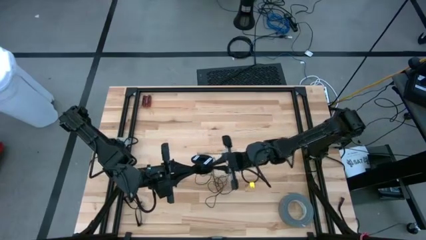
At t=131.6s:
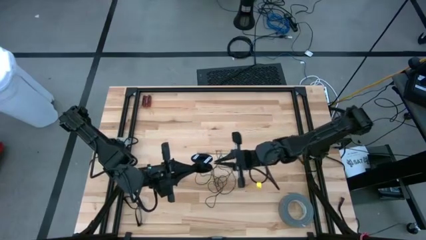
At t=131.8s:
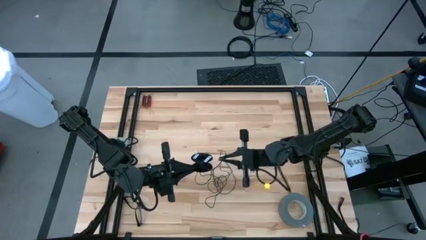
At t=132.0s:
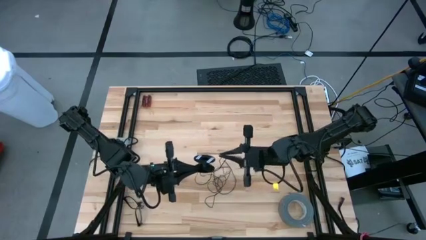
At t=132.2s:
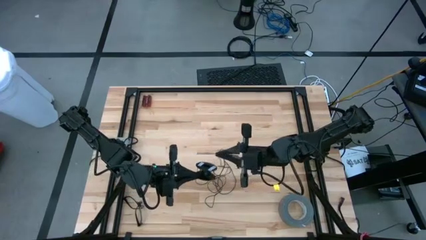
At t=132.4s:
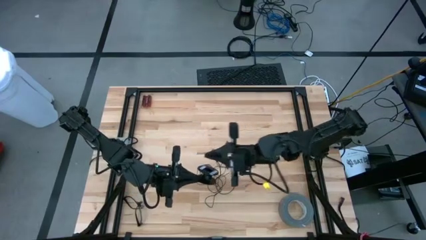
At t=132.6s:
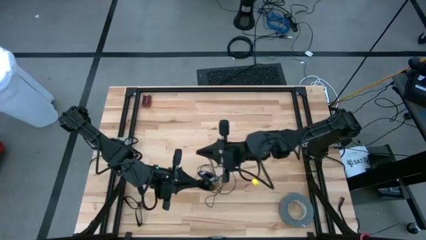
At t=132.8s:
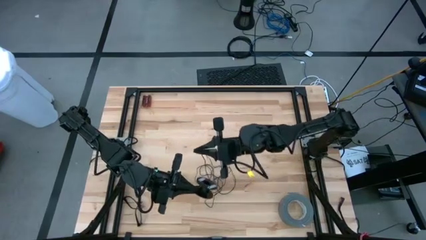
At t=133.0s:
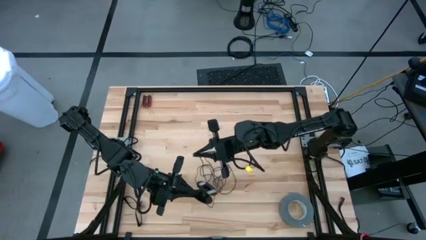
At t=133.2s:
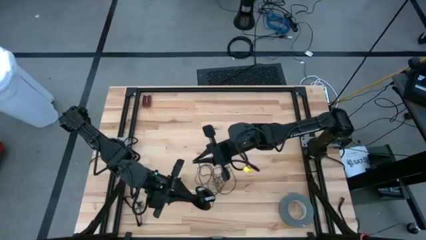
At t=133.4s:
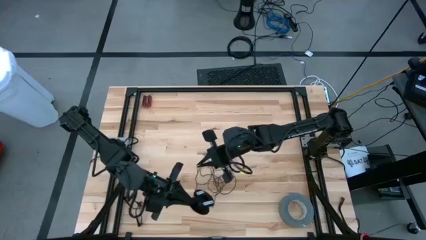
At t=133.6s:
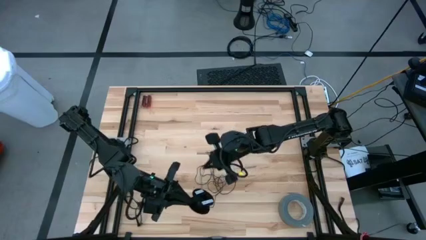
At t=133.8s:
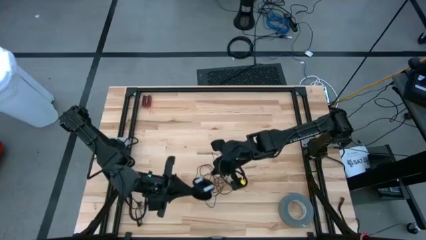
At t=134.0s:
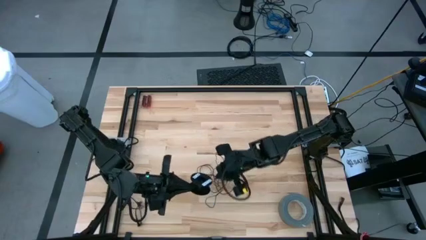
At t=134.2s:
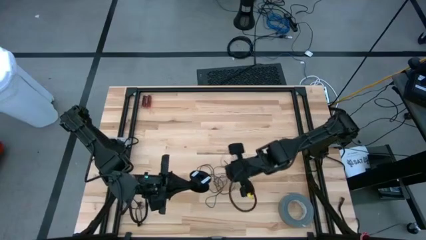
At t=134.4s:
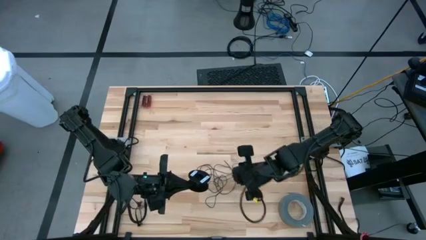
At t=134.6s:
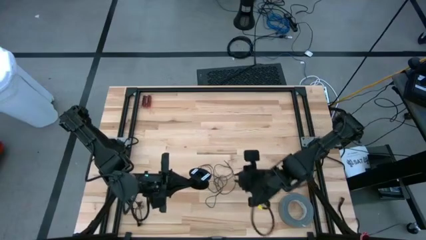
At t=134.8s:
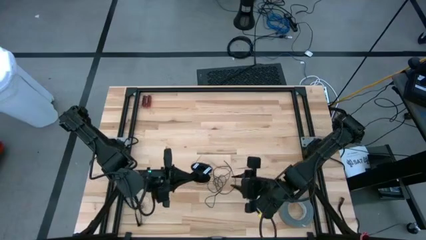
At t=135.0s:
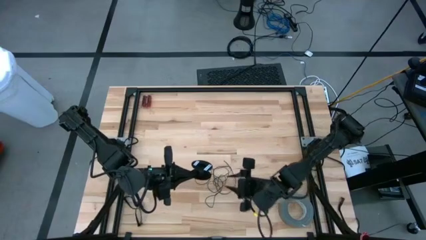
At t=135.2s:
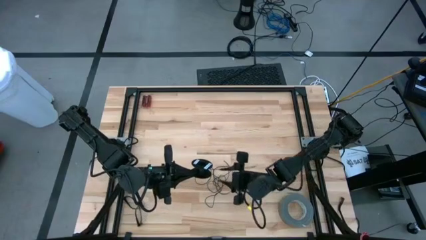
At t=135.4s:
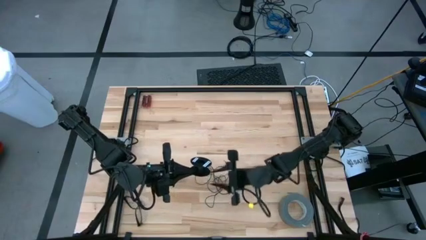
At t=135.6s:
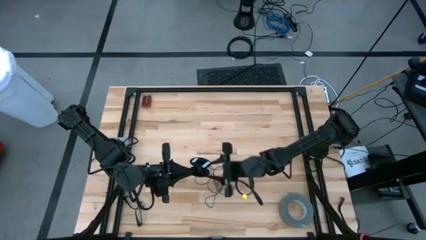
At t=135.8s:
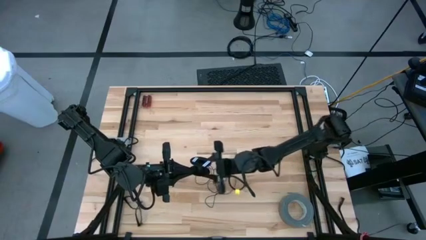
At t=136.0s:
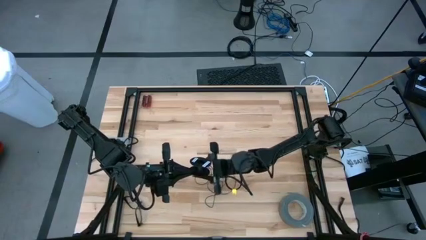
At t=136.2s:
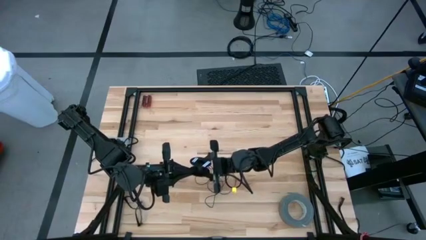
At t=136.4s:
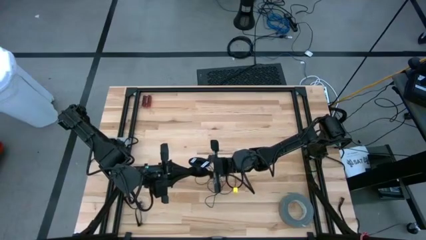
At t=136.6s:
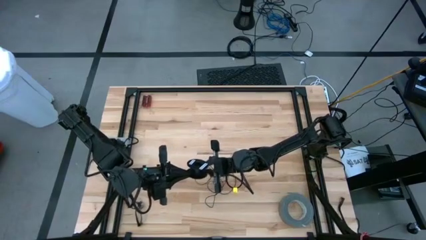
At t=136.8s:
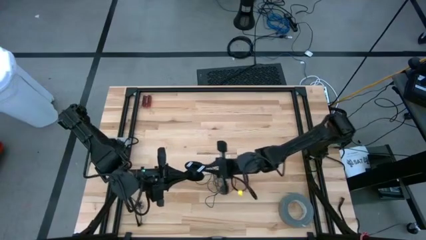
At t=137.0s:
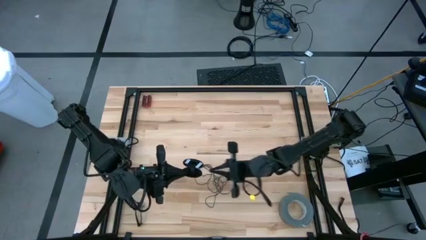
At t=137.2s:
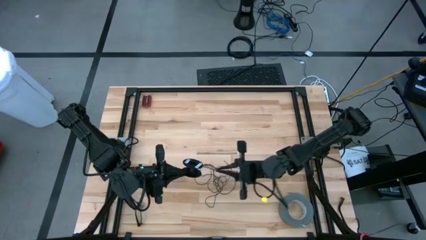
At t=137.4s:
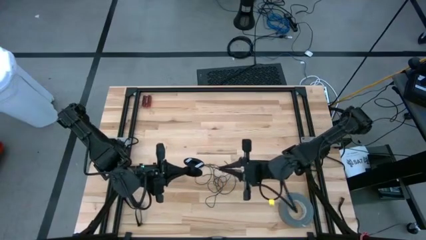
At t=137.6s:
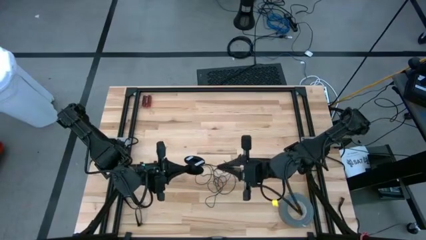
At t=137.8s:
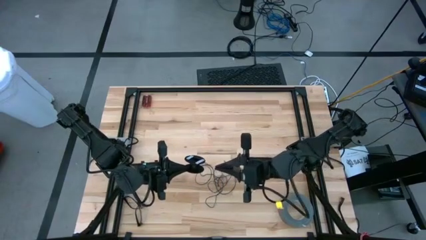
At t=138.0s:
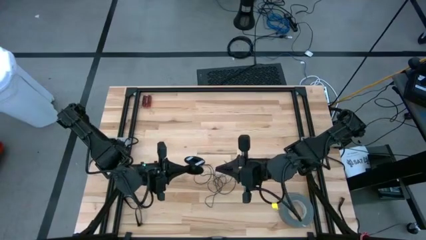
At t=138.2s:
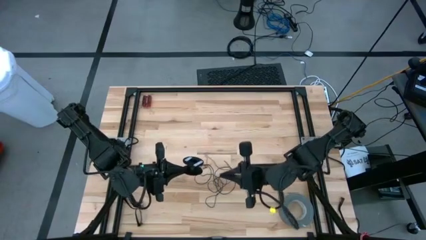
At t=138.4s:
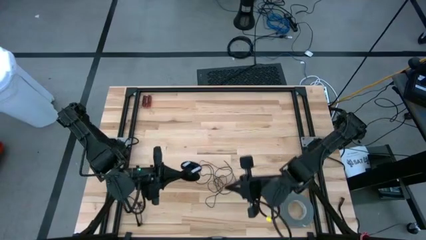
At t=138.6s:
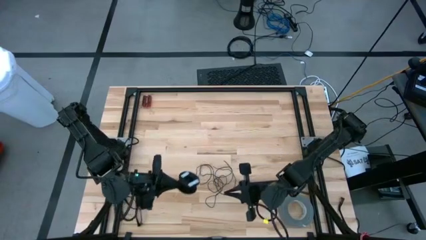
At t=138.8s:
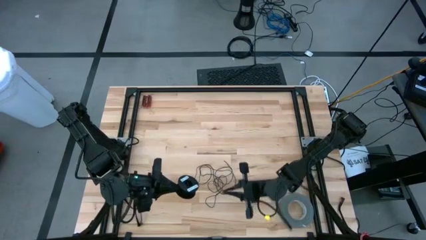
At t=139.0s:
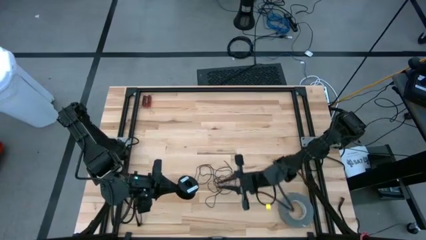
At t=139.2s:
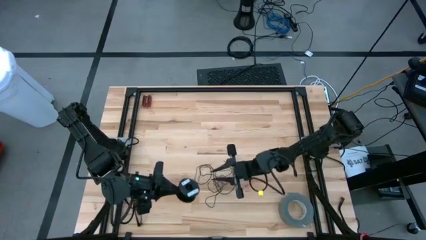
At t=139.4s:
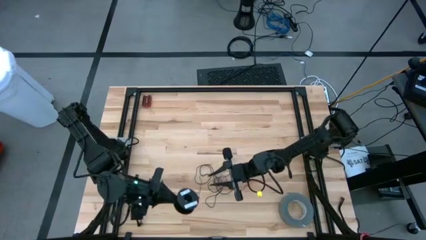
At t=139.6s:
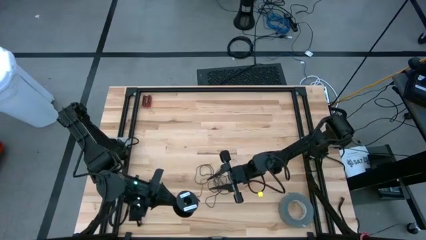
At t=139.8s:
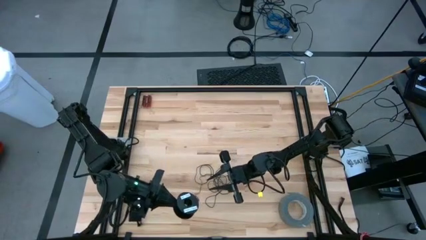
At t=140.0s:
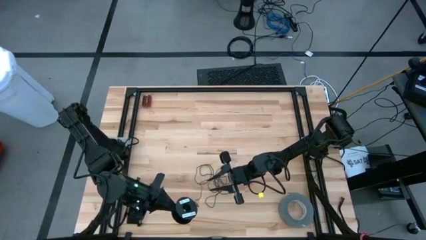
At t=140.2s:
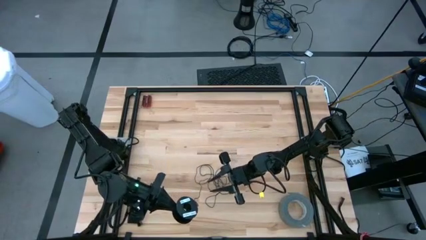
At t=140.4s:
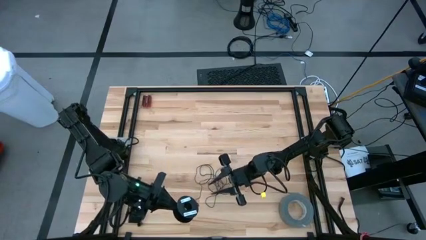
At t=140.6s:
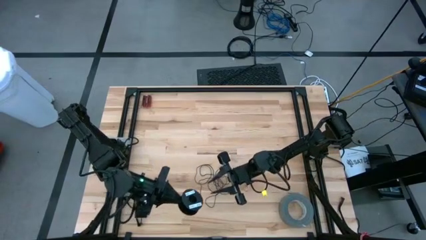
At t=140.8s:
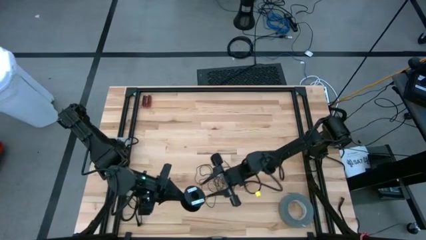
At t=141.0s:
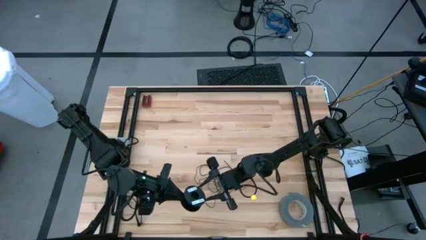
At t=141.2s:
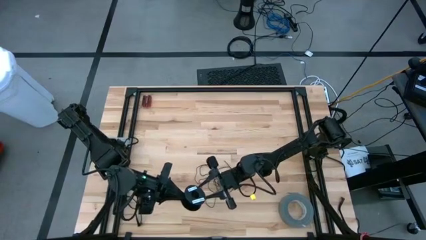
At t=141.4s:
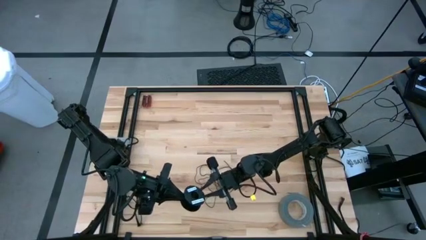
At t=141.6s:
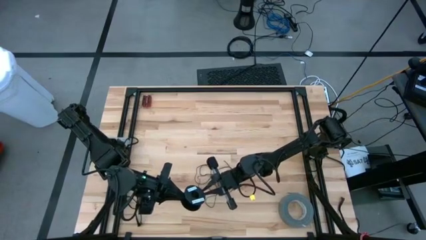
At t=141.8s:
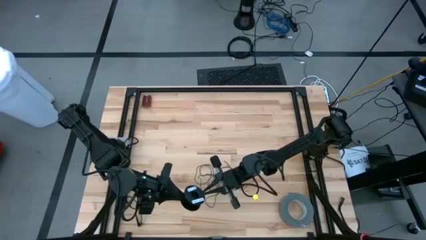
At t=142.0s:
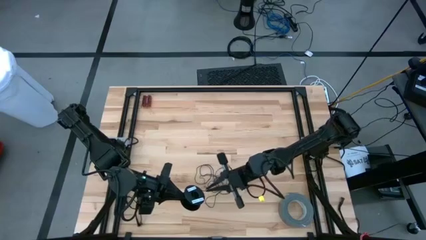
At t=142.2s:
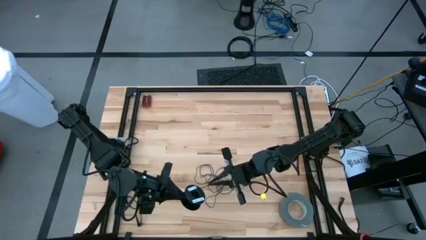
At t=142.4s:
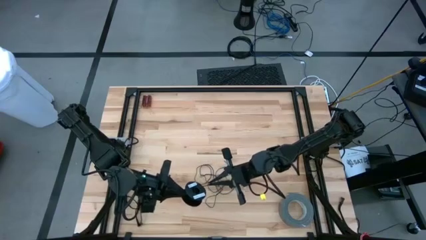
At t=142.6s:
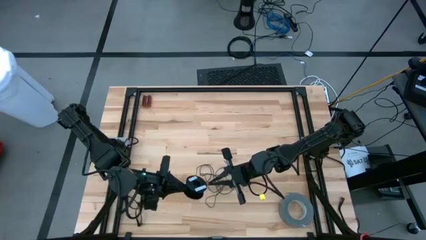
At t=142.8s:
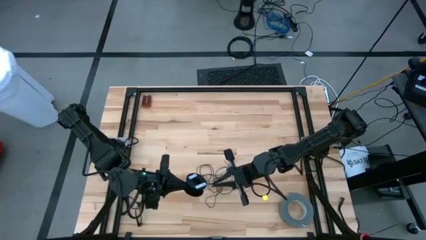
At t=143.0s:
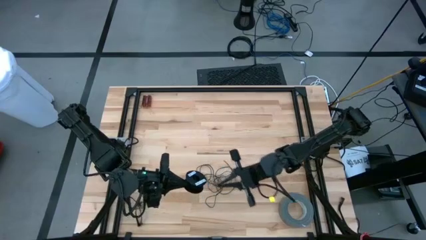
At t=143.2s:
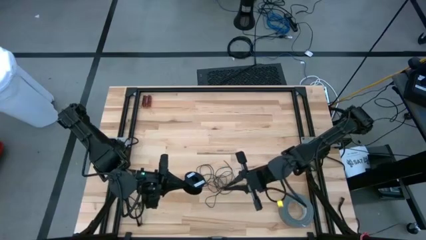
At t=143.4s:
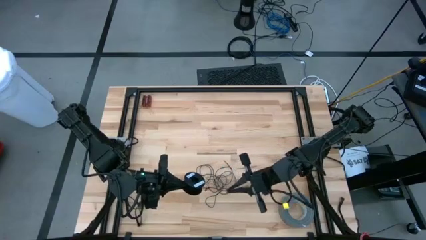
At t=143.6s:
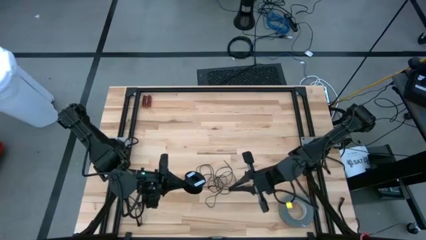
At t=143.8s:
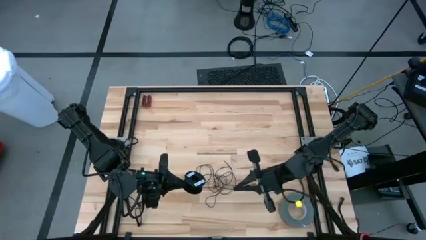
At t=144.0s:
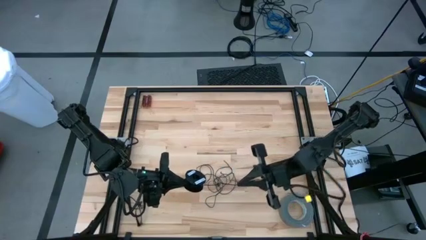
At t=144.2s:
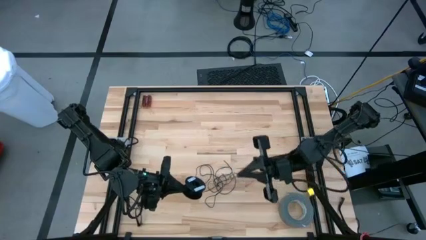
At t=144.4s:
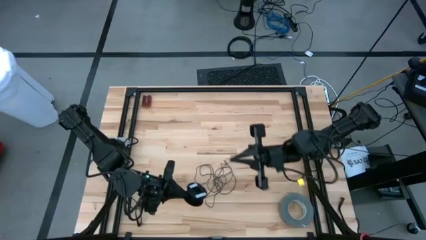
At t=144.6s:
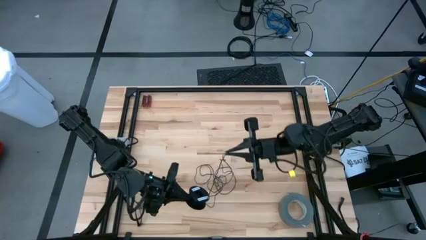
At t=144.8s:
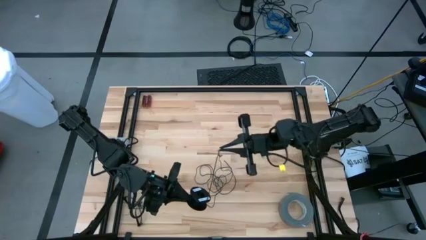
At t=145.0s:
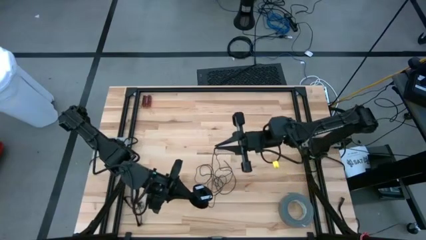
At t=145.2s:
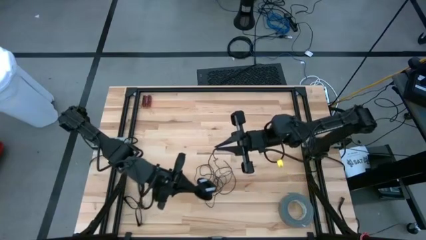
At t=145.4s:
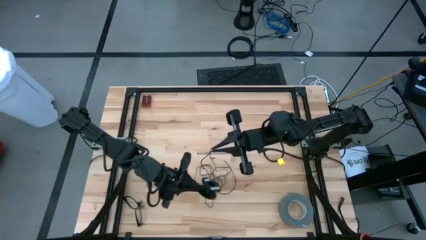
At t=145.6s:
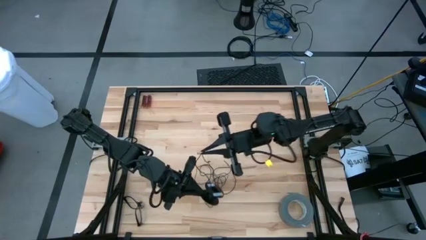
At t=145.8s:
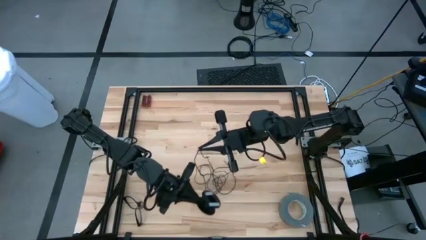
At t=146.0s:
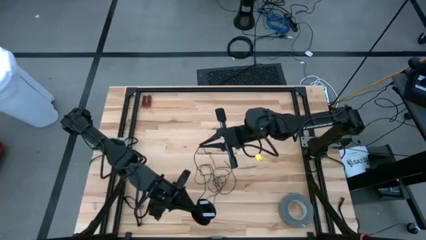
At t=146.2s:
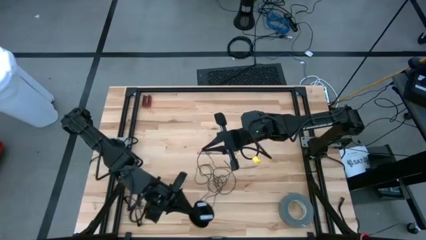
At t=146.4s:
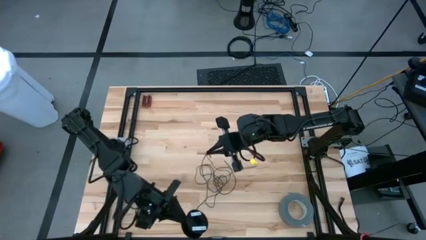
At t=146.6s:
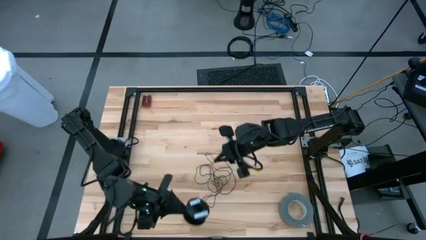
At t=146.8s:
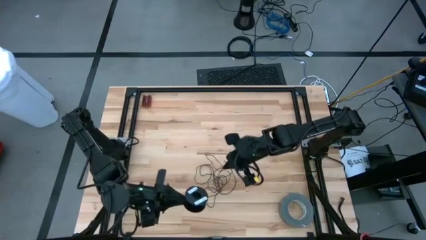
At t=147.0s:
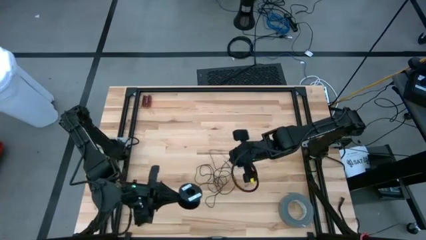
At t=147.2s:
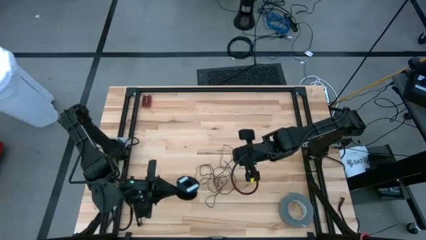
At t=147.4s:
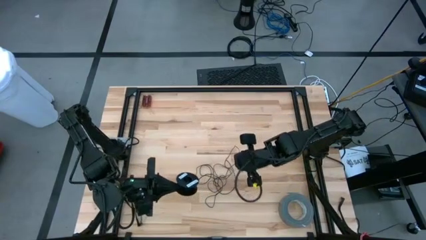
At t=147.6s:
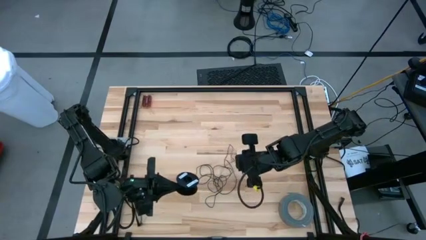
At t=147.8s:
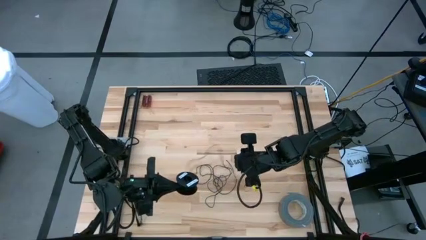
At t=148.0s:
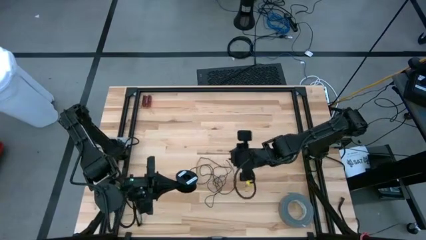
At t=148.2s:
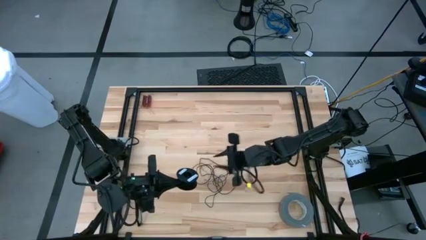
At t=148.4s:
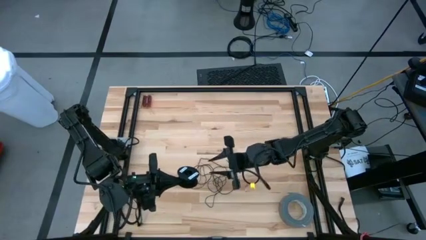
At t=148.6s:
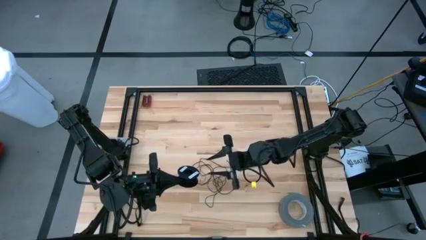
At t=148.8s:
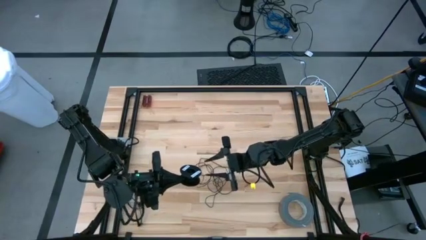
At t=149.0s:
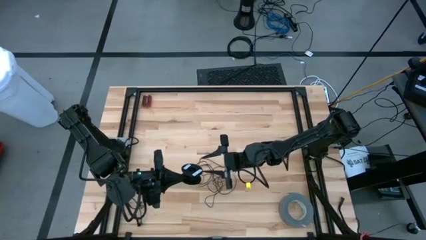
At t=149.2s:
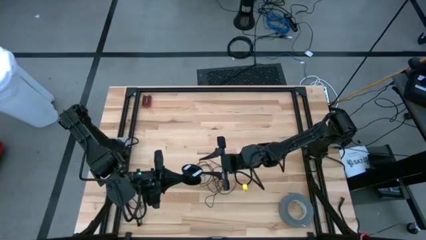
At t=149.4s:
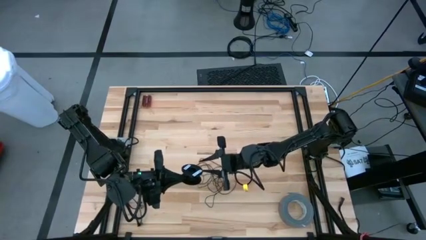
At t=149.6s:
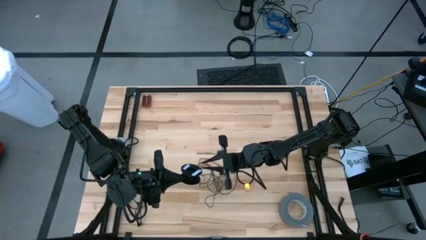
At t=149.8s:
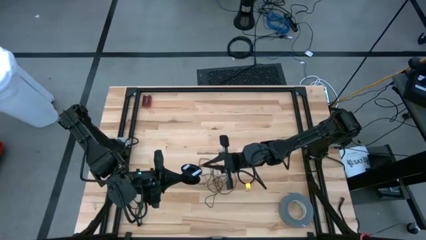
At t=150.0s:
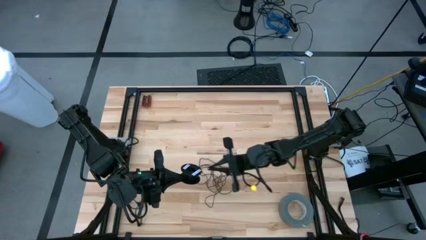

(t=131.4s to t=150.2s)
Task: Coil cords
Uncoil the black wire from the spool
